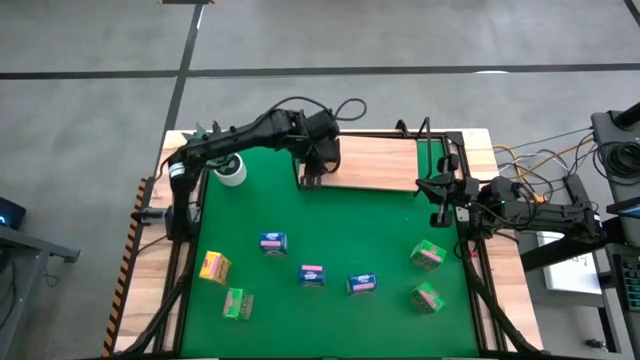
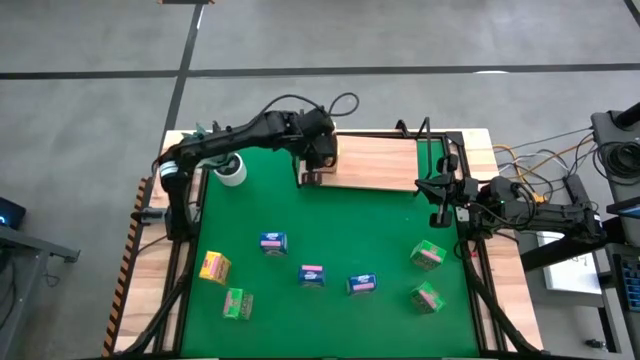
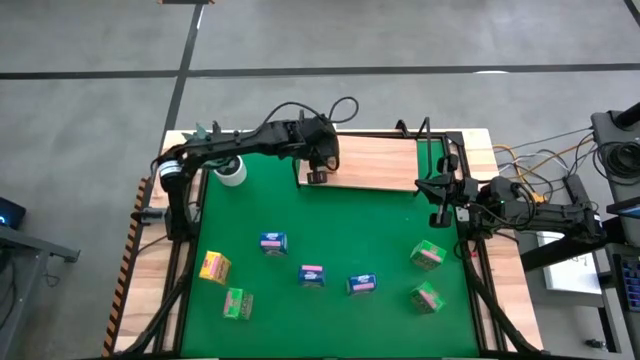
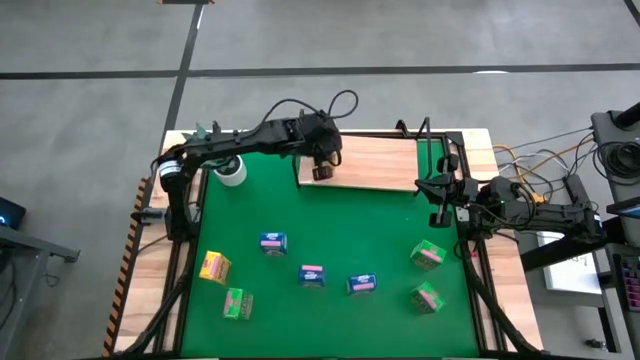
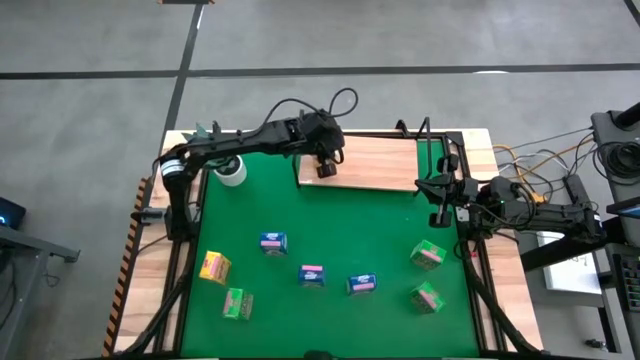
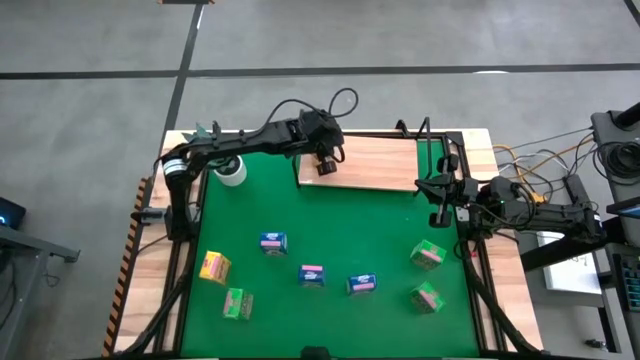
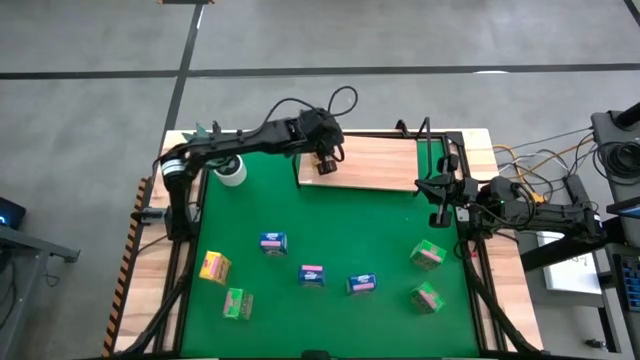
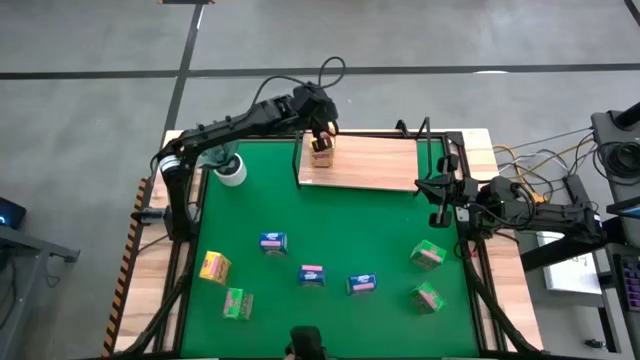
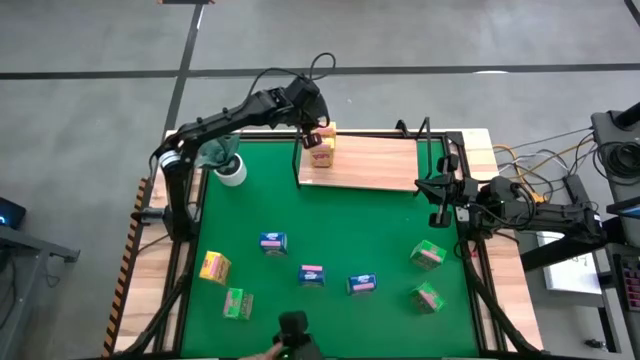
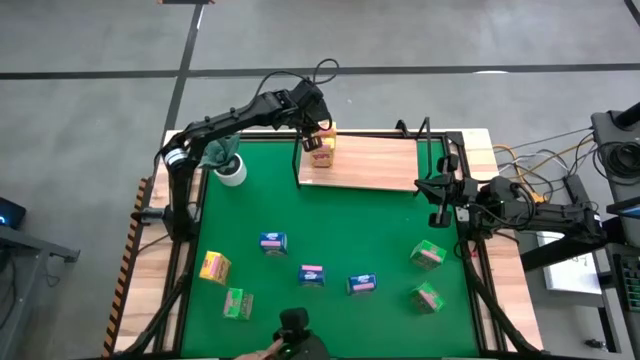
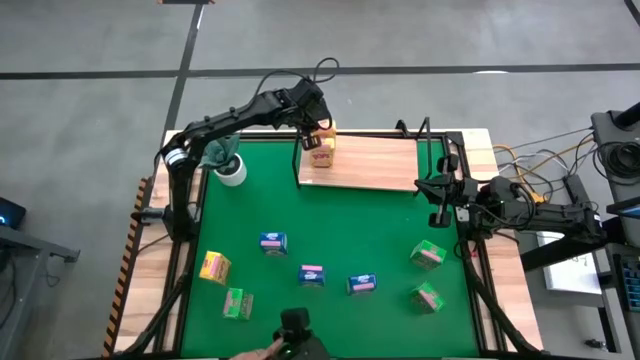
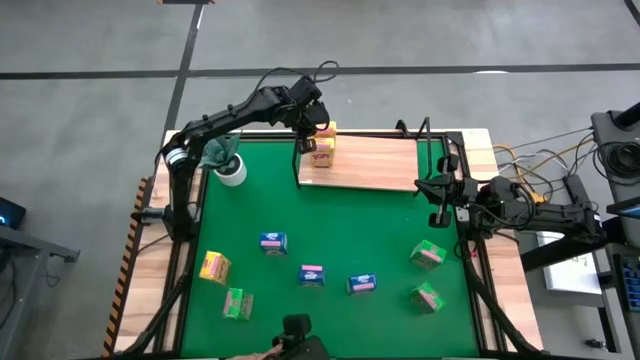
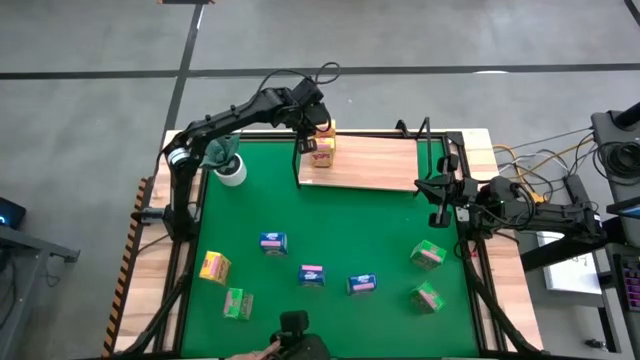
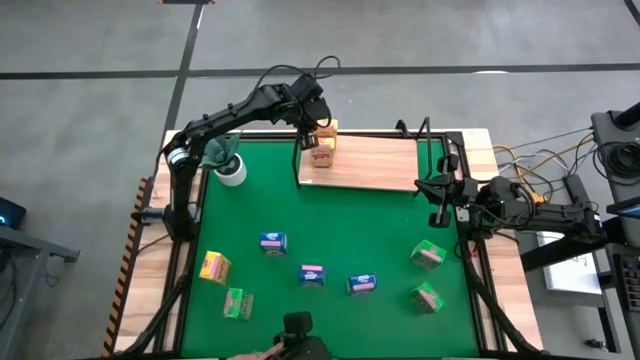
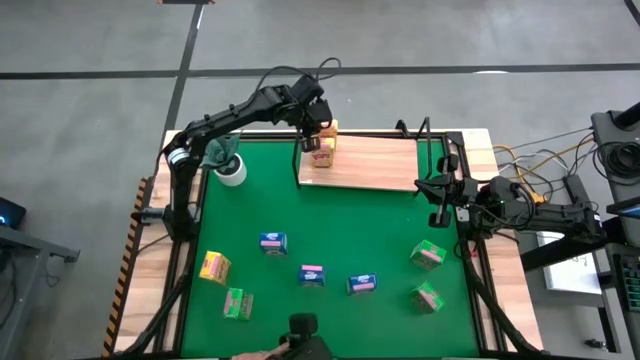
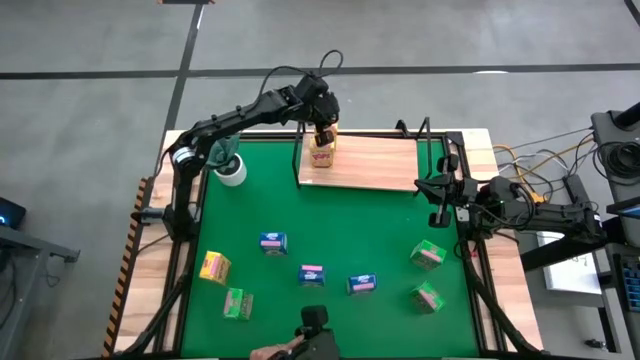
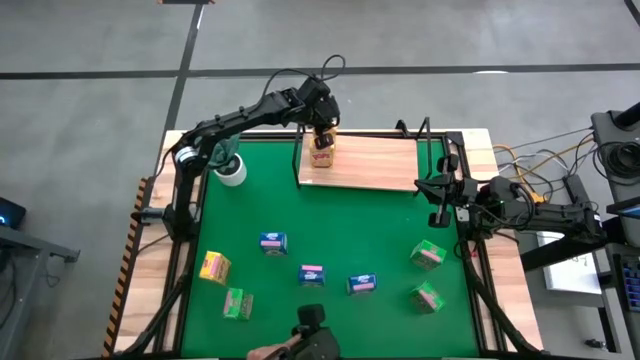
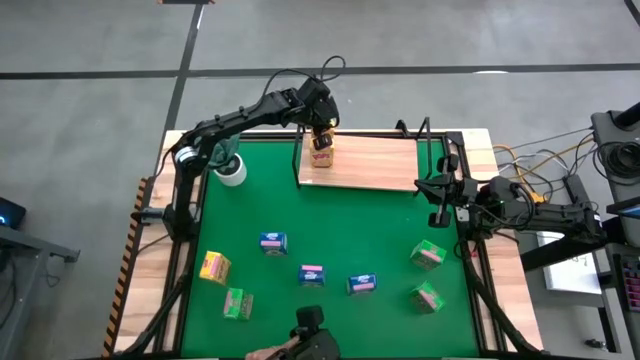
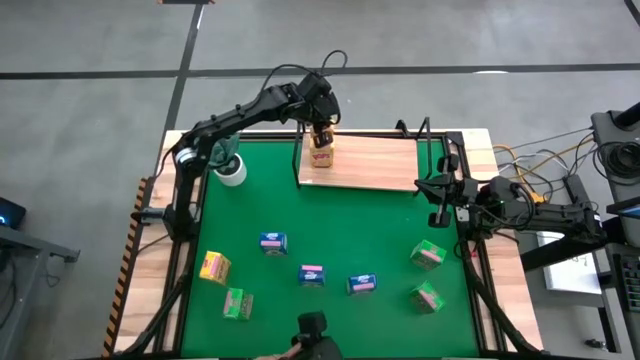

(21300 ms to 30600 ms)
Task: Stack cereal on shelf
Adjust the yellow cereal boxes on the shelf

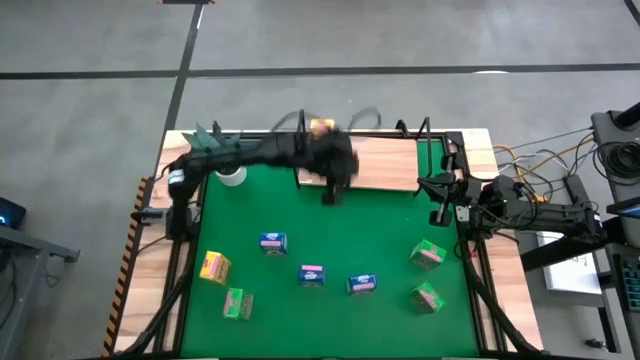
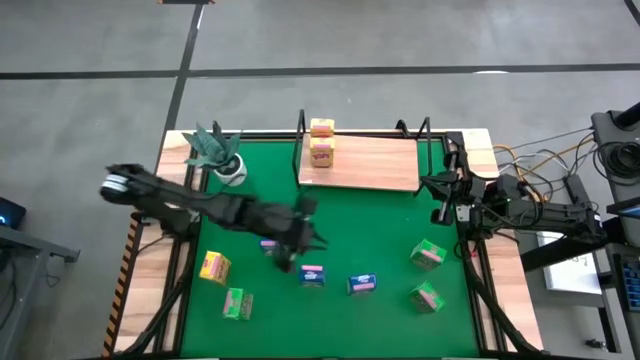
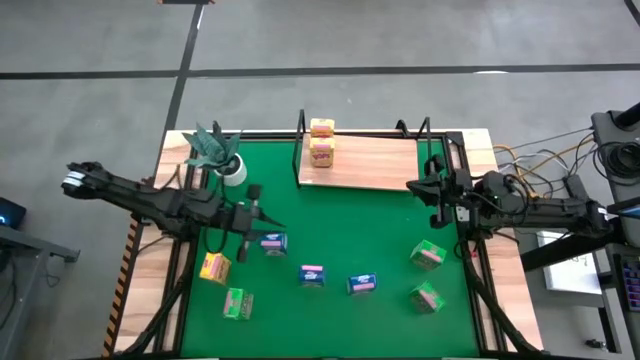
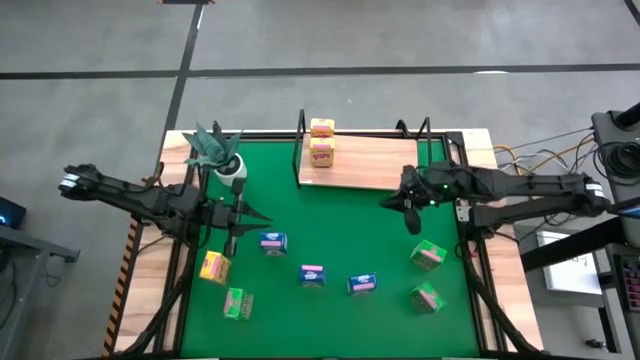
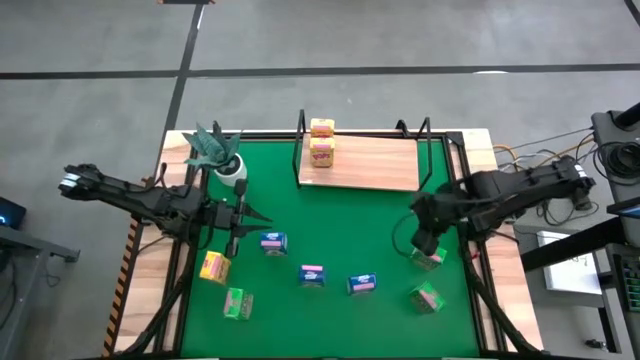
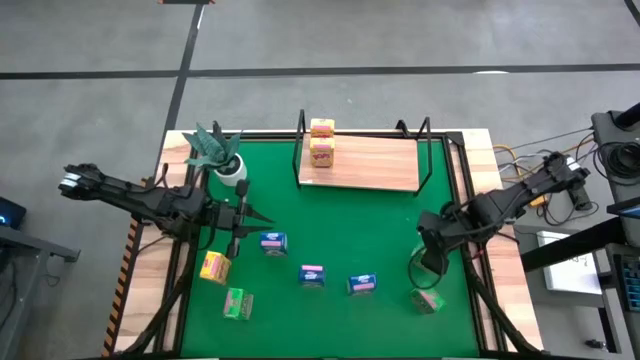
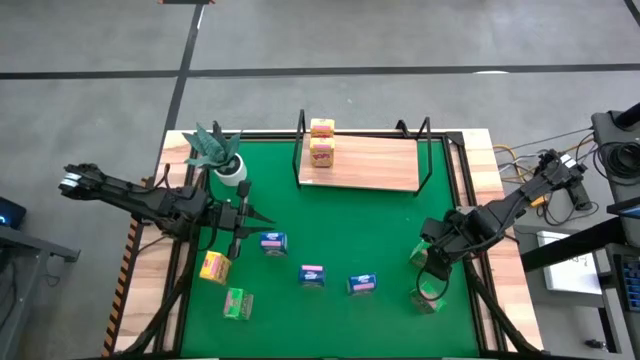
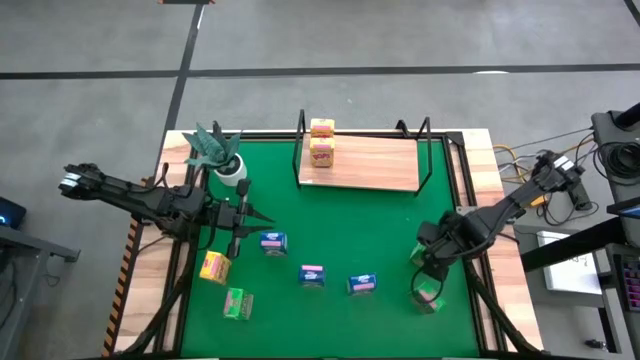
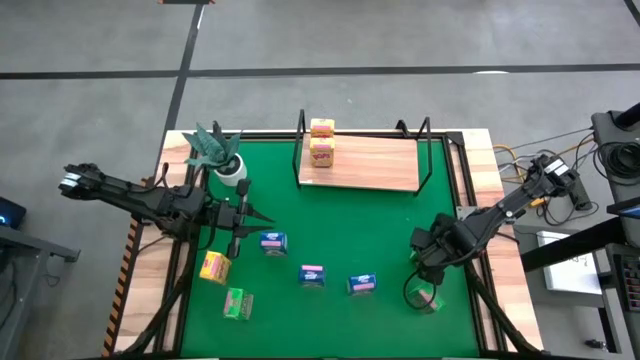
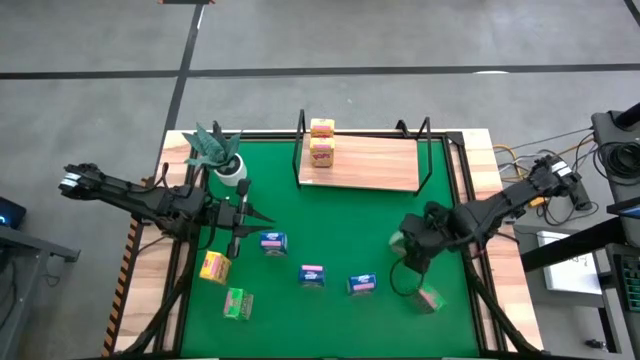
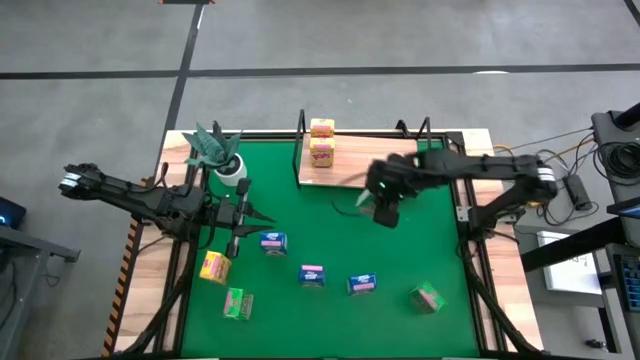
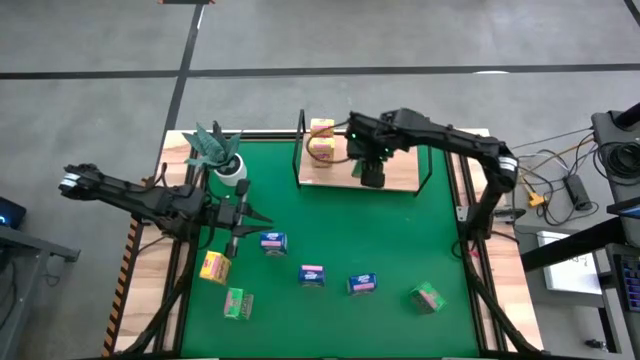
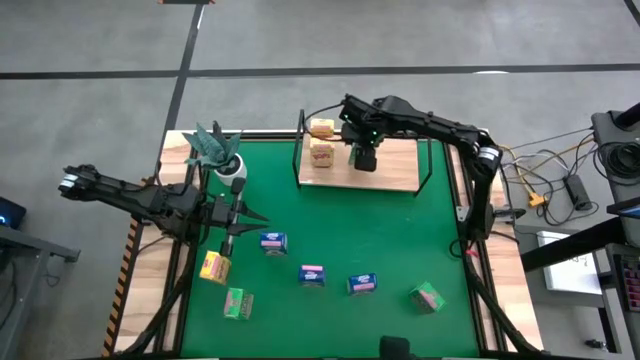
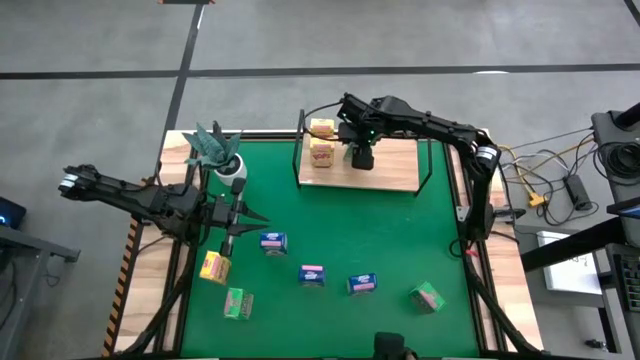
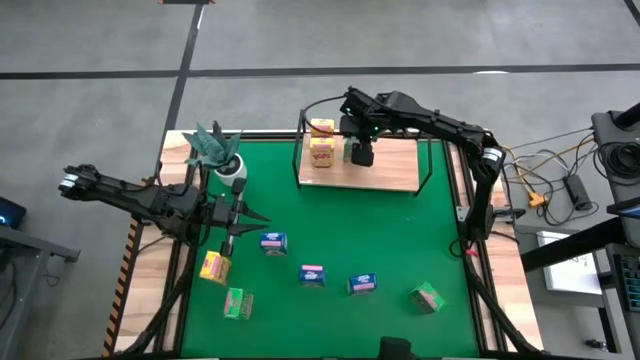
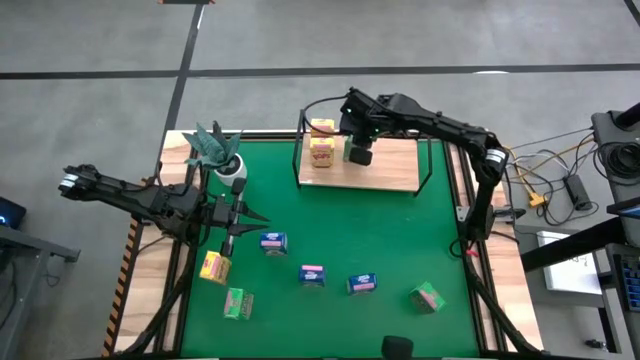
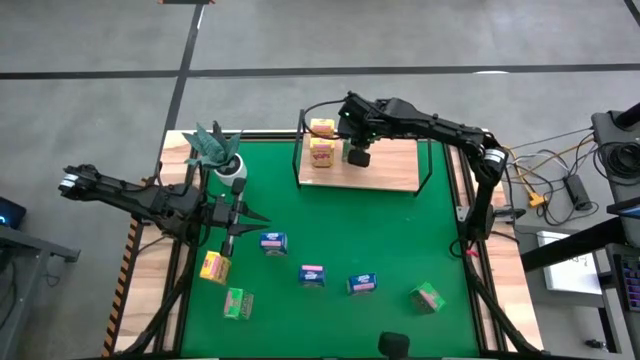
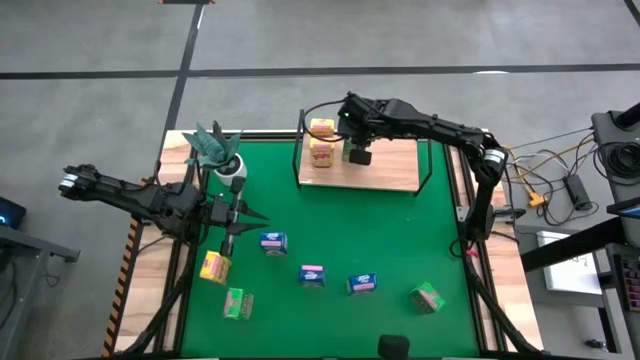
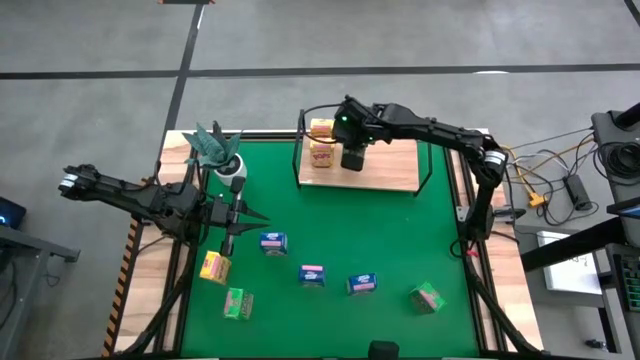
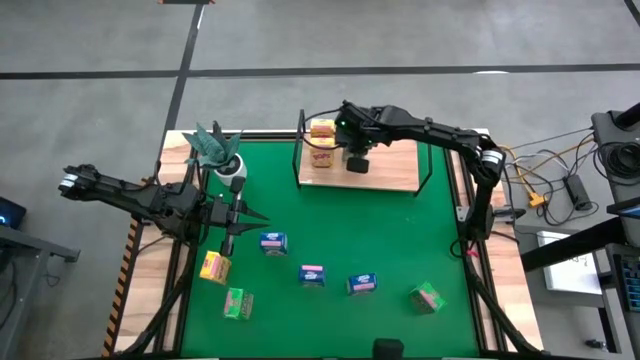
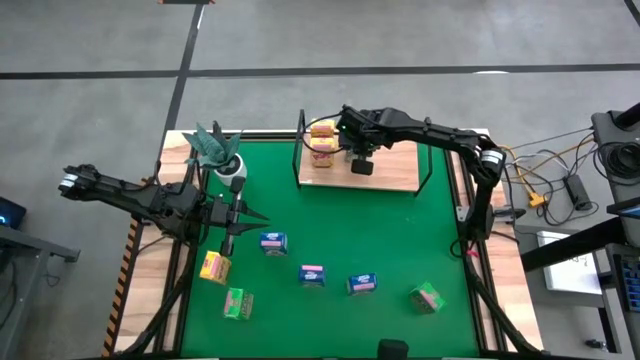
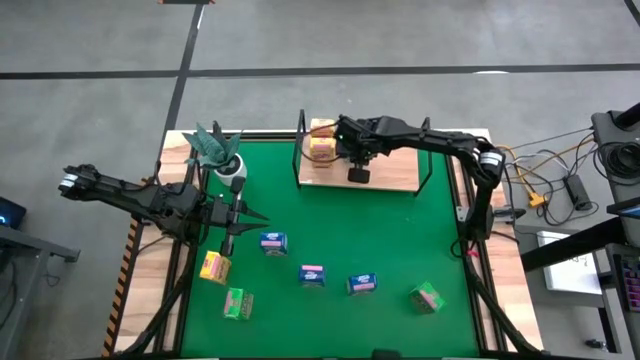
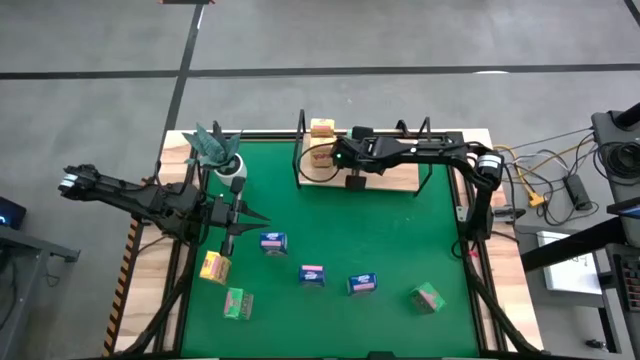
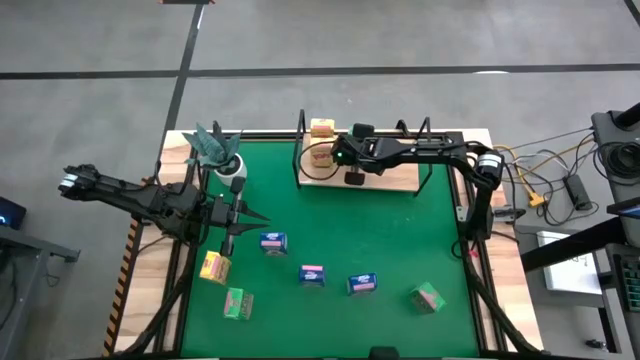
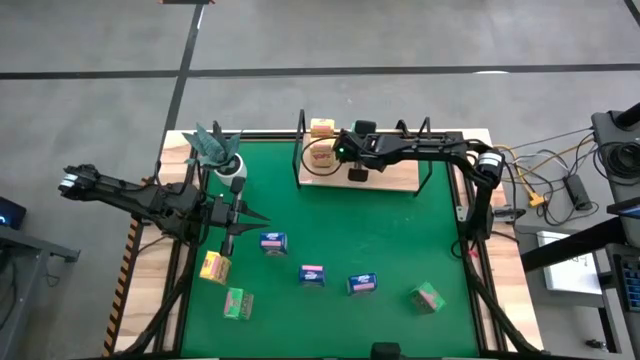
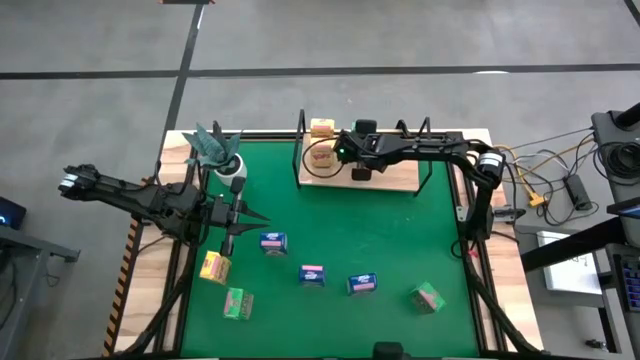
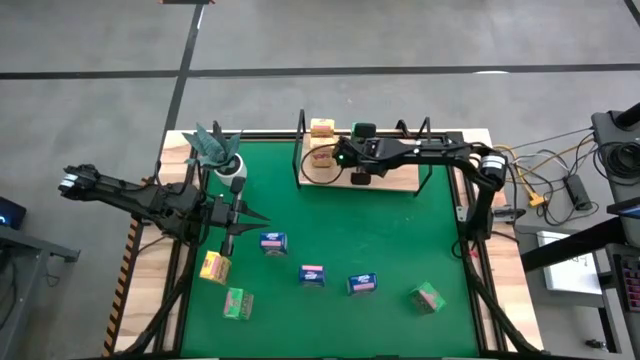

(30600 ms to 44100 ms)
Put the top right green cereal box on the shelf
